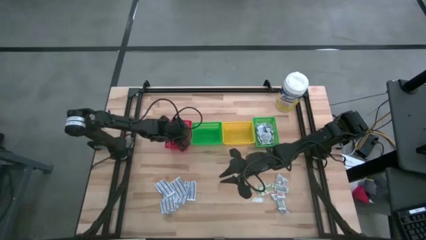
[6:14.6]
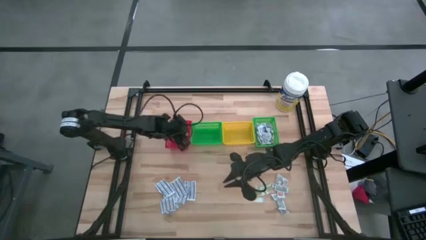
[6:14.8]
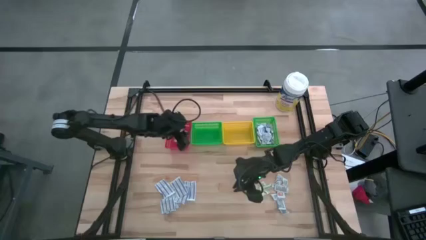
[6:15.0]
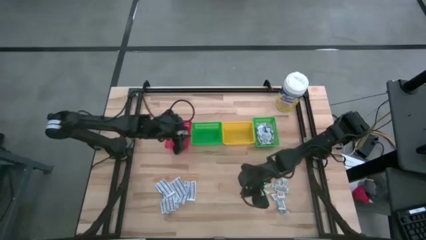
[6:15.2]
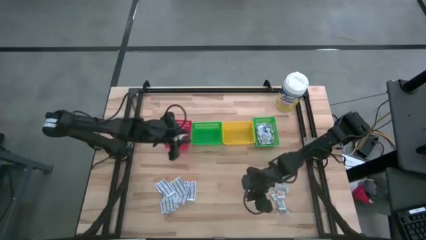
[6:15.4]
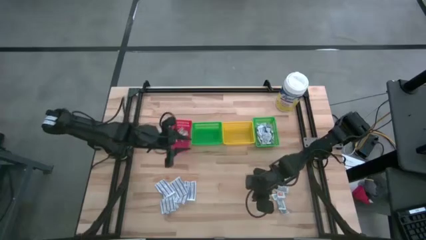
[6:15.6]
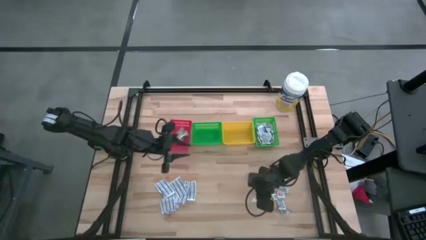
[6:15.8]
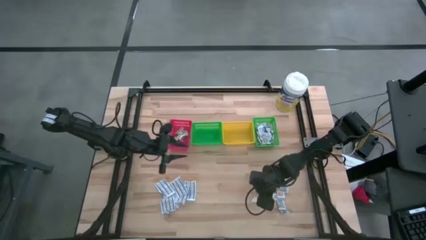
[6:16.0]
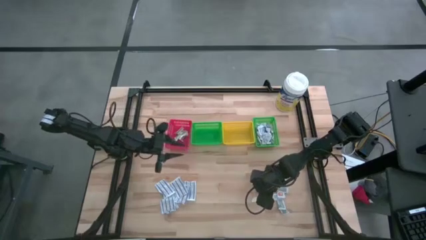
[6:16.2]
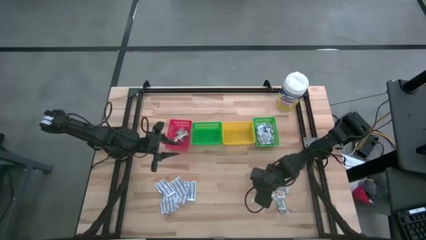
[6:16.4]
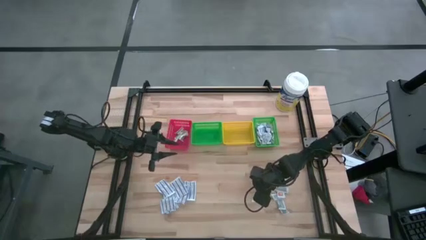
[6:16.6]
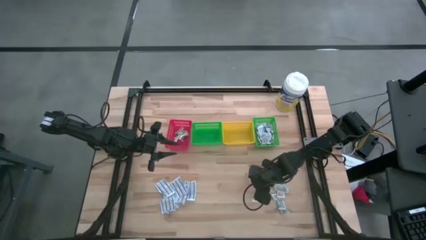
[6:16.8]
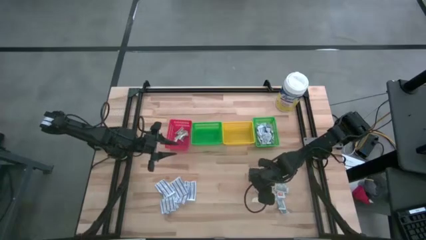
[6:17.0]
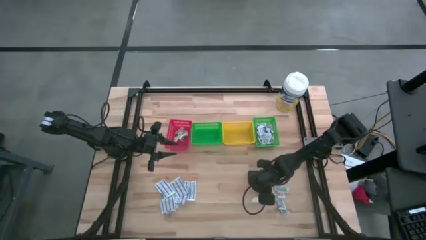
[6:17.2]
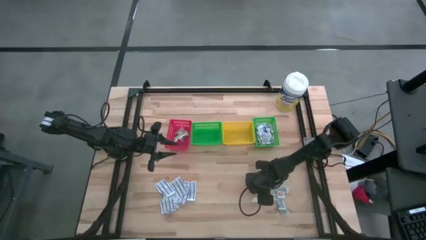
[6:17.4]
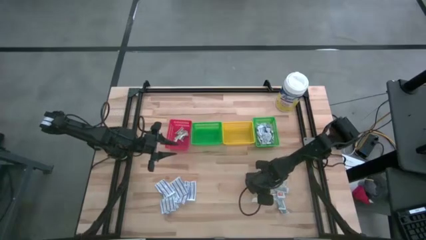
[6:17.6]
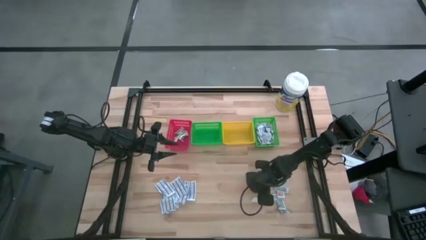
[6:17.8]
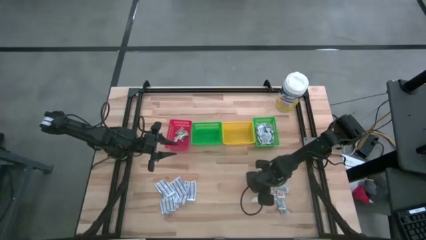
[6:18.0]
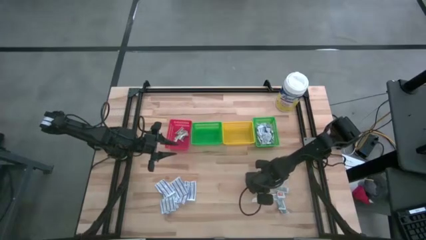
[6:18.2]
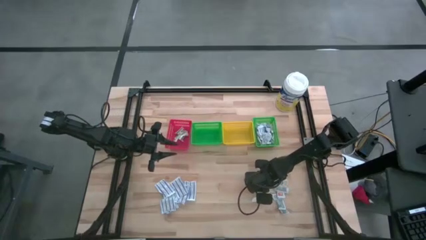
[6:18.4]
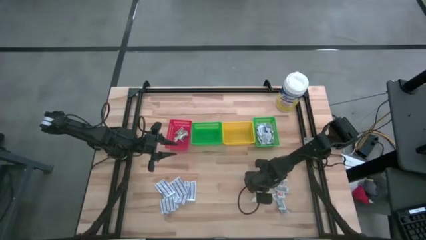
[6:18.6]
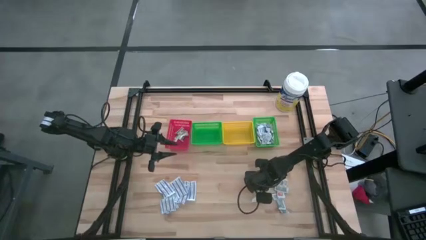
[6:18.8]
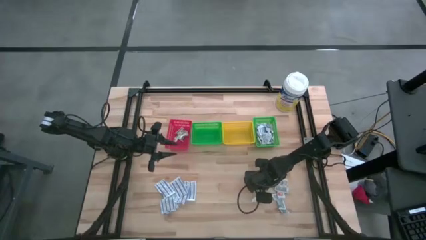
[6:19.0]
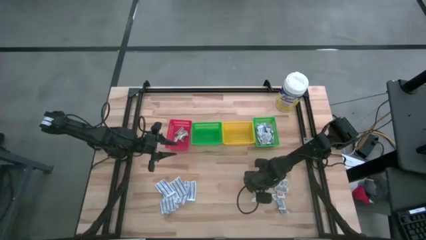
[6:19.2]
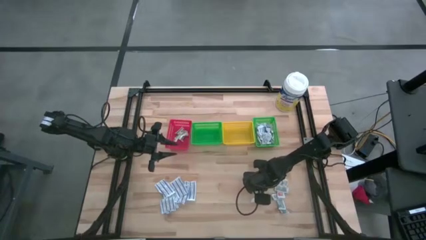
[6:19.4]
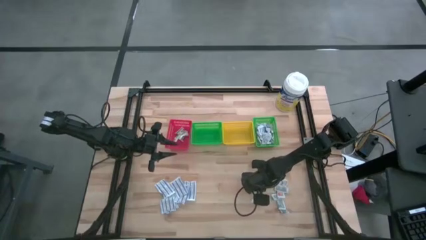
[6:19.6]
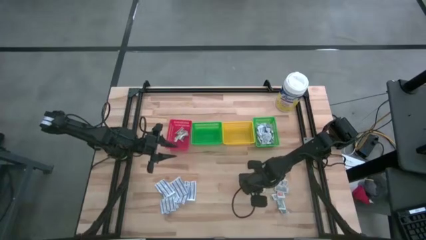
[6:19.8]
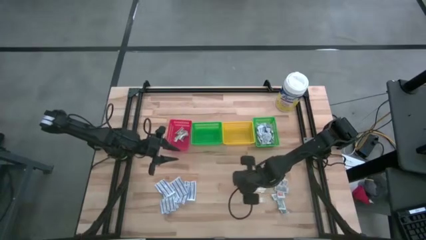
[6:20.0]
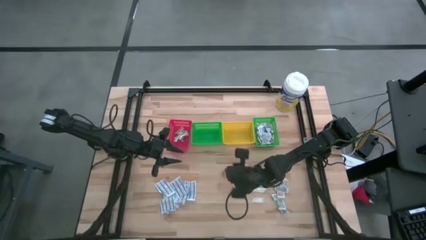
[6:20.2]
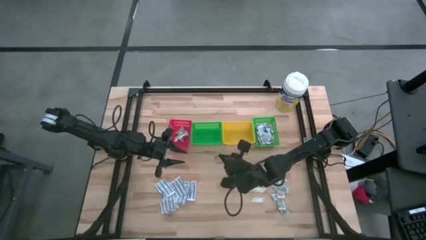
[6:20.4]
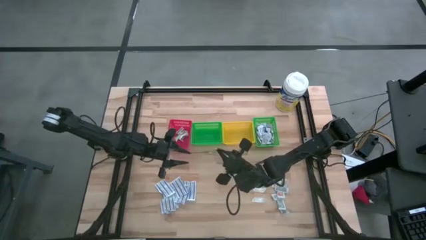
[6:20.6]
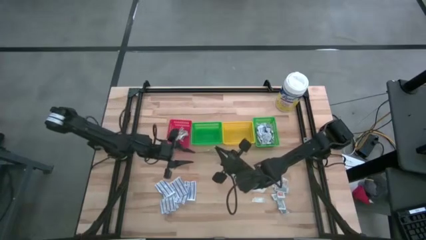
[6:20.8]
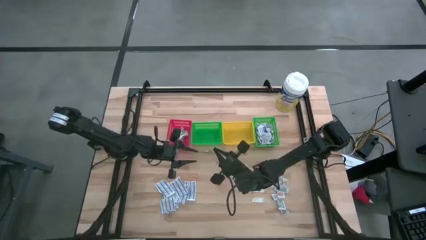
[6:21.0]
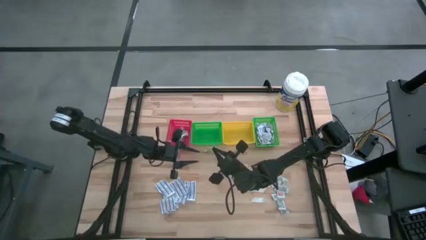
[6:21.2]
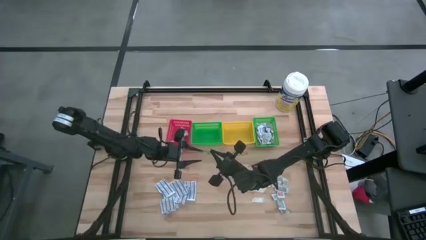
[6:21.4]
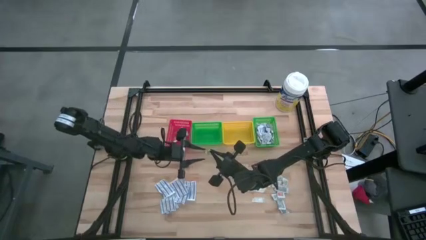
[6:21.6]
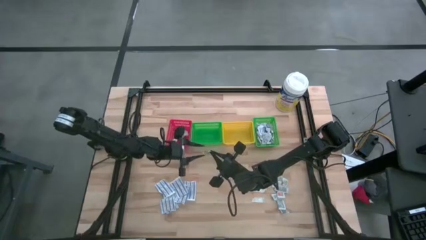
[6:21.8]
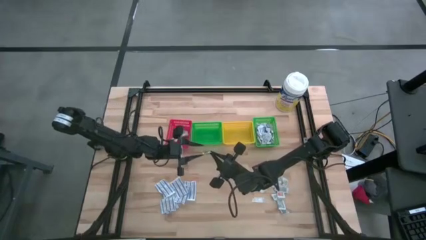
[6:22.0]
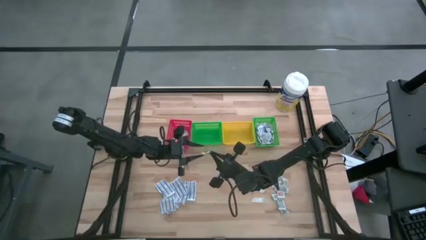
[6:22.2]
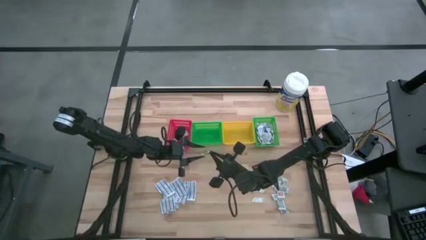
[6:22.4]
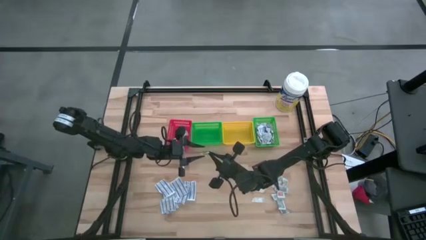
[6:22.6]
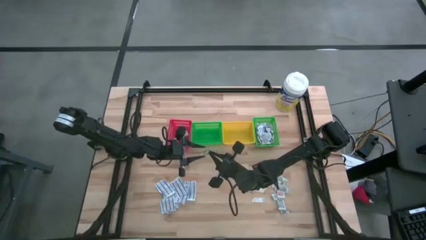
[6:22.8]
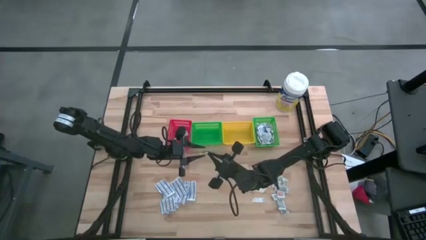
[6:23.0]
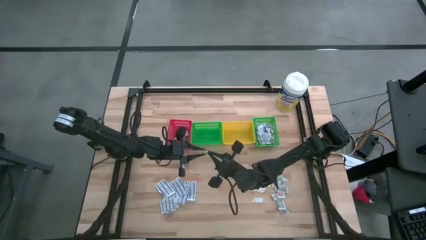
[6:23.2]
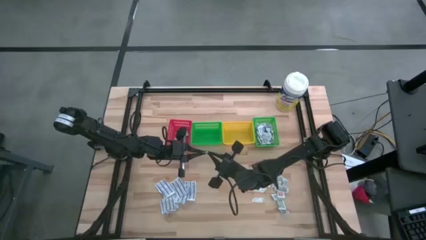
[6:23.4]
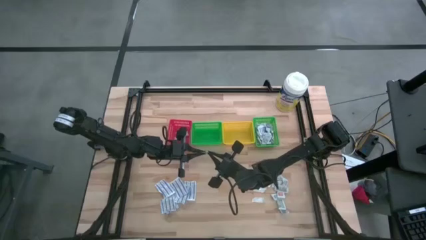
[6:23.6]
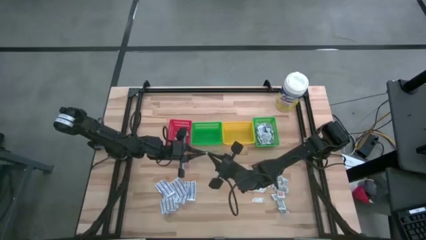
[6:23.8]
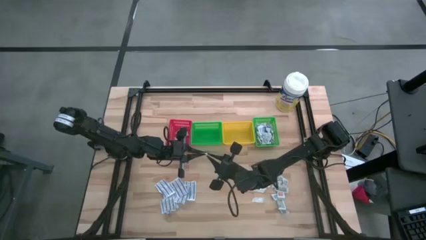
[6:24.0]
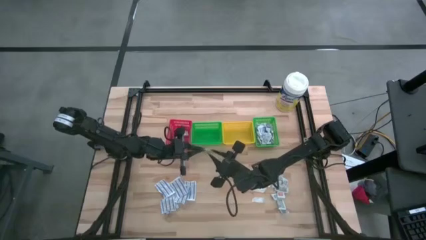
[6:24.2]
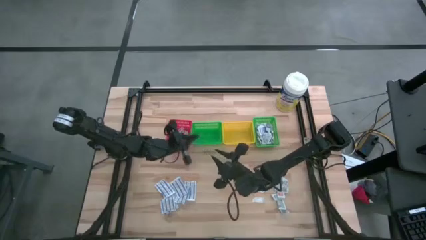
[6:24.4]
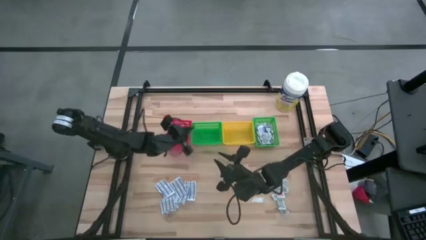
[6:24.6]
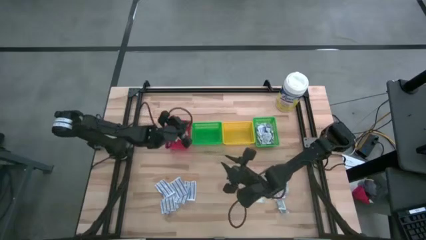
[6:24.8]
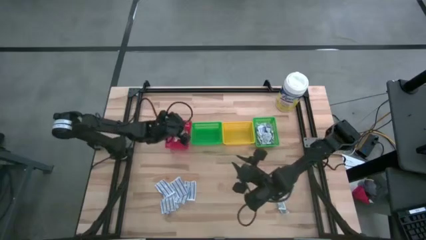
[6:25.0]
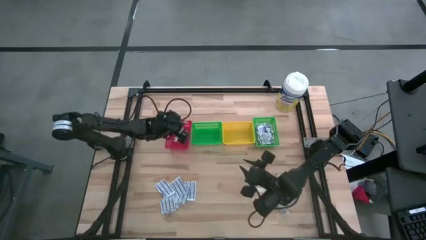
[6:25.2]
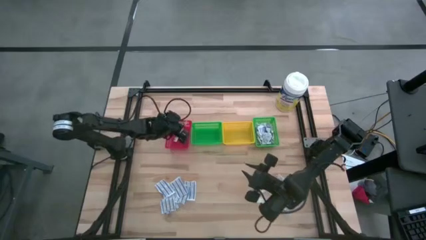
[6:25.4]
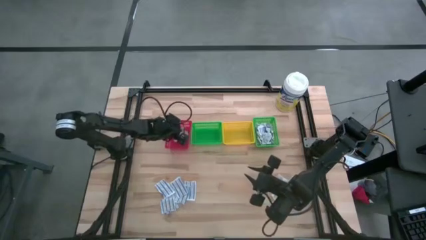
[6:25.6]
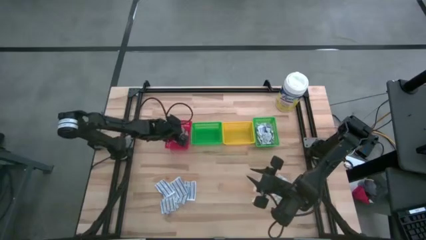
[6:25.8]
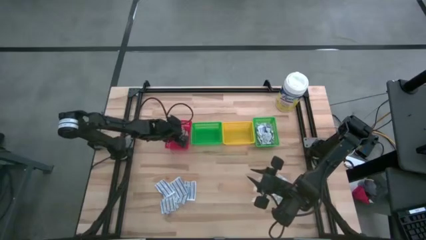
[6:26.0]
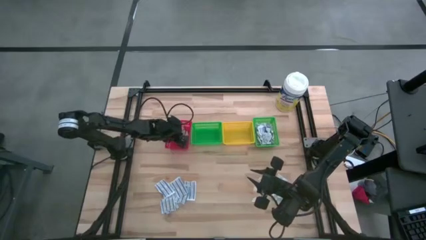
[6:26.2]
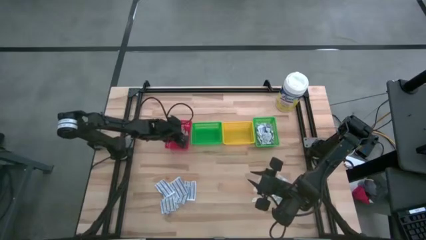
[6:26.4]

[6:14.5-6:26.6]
Task: Pick & Place First Aid Supplies
Put the green bandage into the red bin
